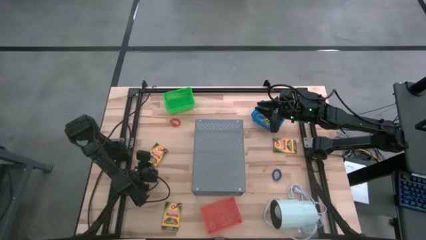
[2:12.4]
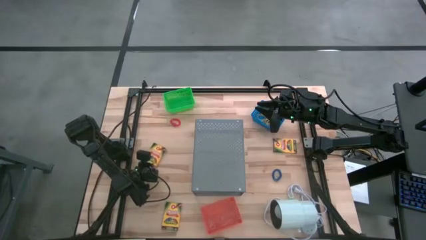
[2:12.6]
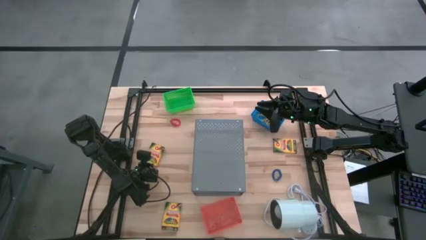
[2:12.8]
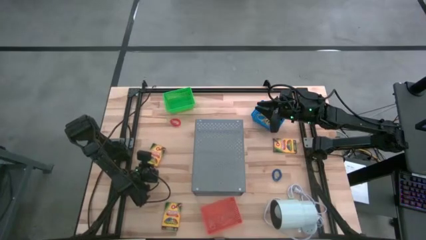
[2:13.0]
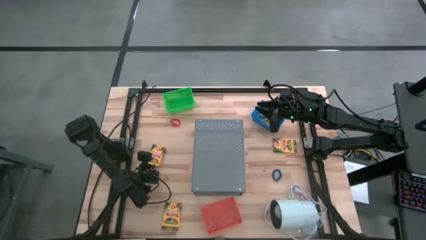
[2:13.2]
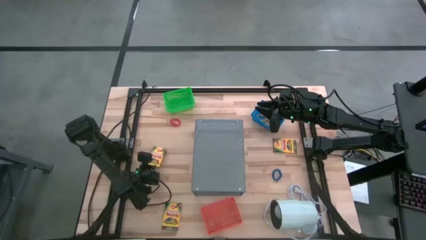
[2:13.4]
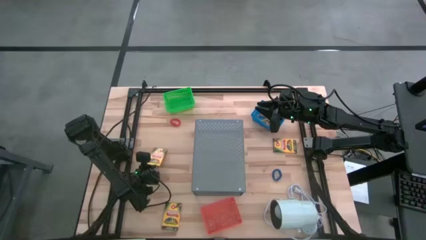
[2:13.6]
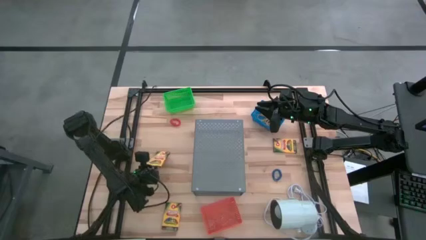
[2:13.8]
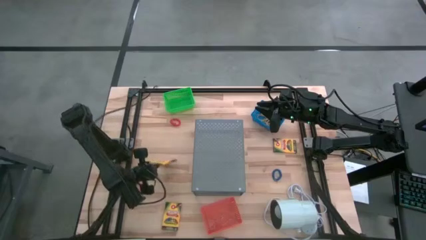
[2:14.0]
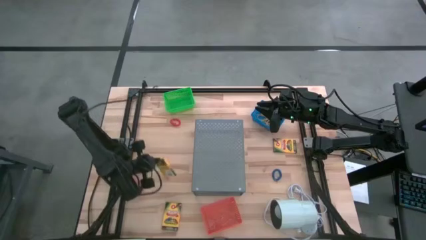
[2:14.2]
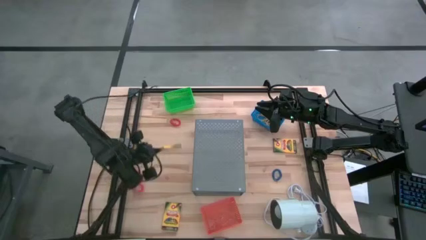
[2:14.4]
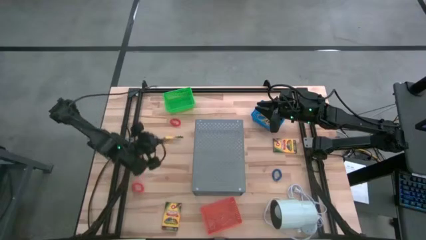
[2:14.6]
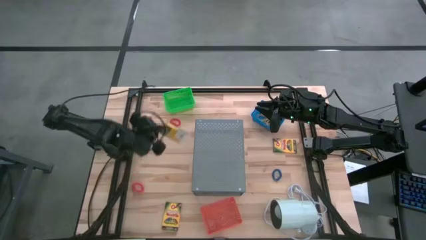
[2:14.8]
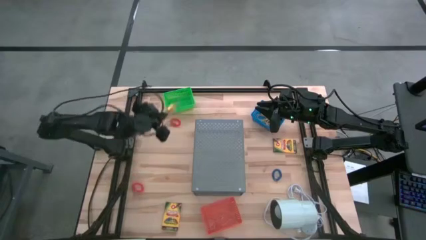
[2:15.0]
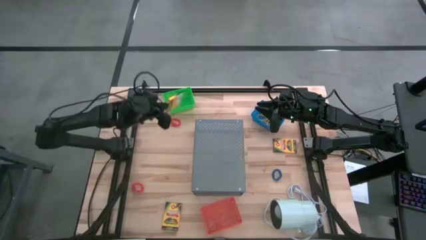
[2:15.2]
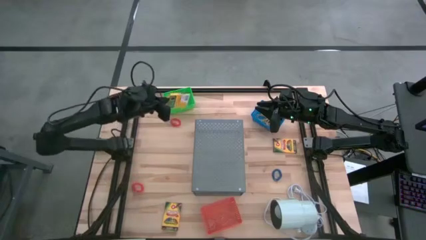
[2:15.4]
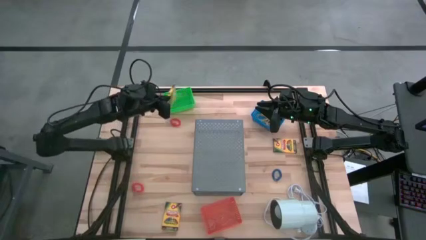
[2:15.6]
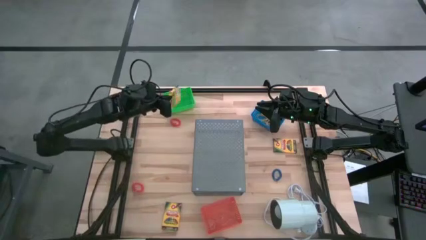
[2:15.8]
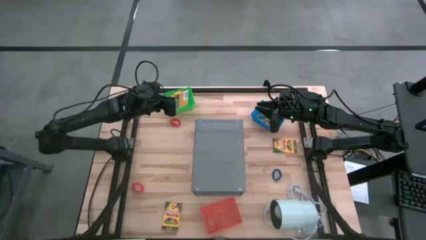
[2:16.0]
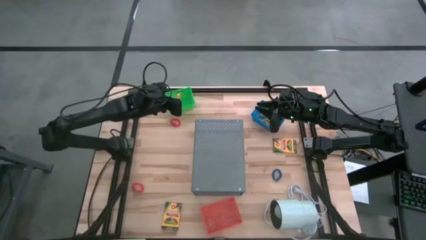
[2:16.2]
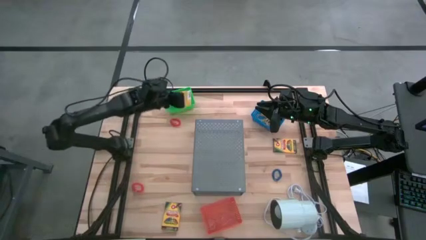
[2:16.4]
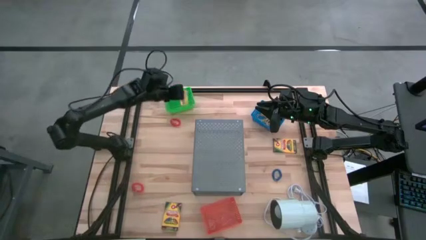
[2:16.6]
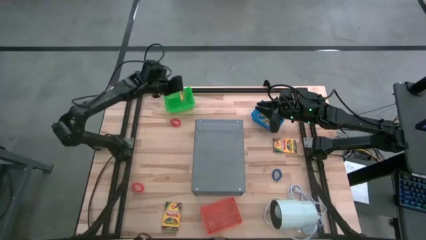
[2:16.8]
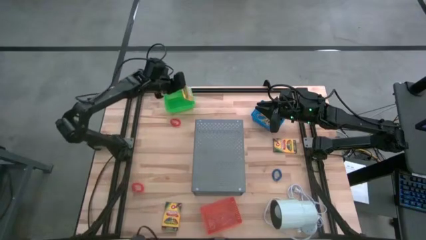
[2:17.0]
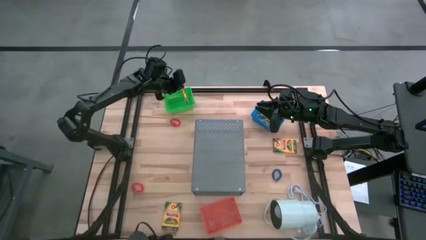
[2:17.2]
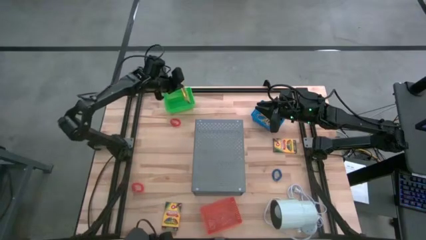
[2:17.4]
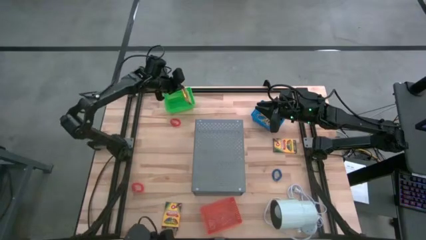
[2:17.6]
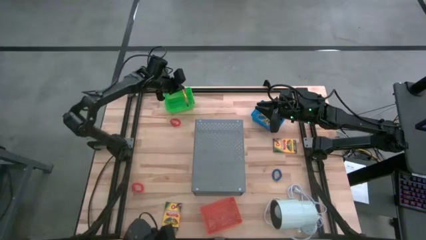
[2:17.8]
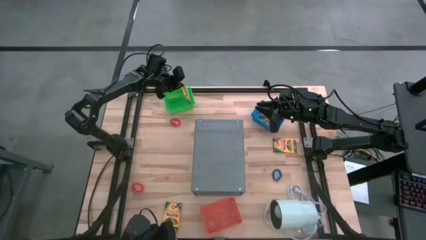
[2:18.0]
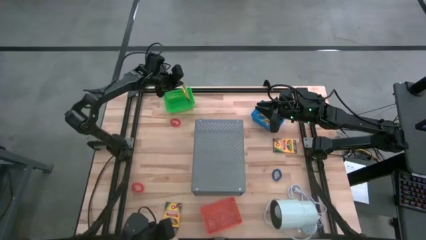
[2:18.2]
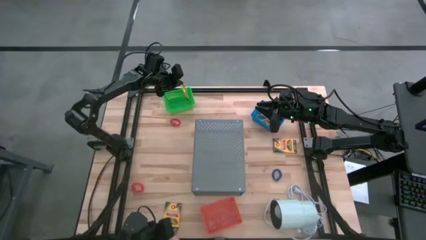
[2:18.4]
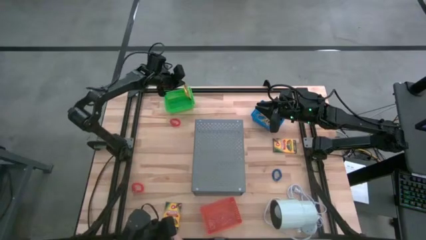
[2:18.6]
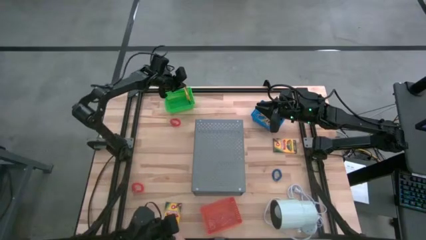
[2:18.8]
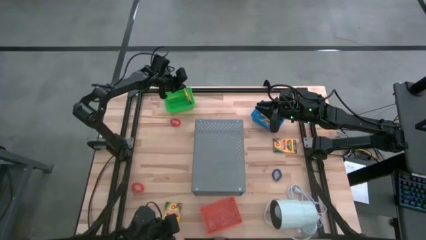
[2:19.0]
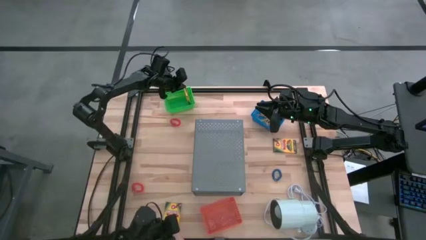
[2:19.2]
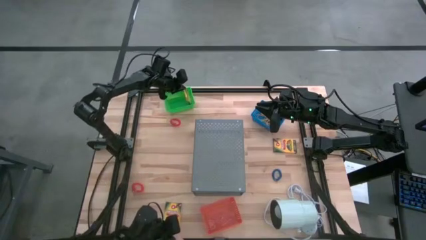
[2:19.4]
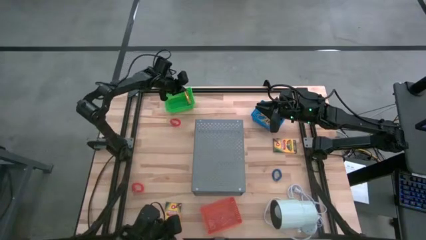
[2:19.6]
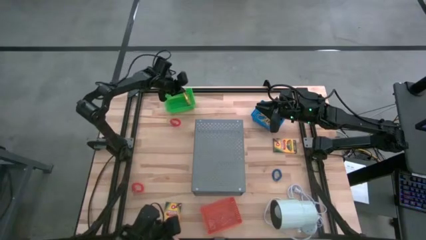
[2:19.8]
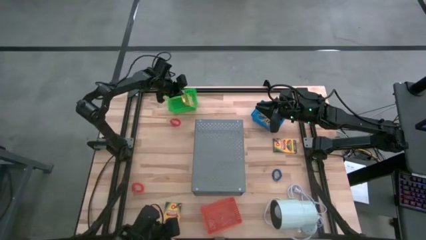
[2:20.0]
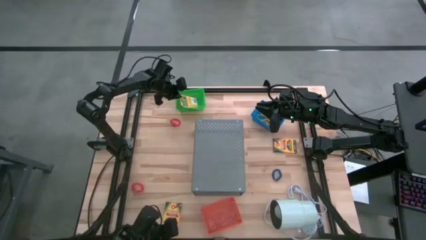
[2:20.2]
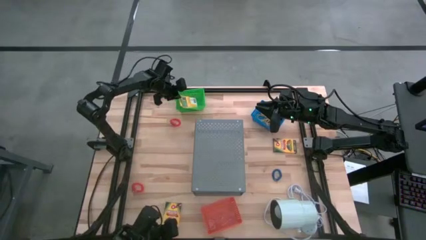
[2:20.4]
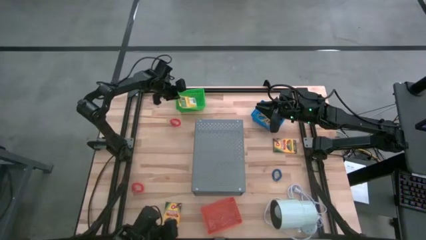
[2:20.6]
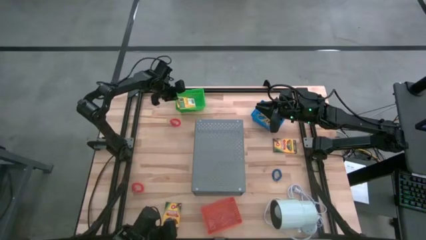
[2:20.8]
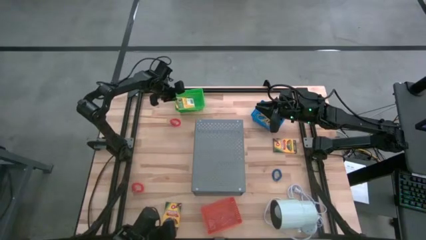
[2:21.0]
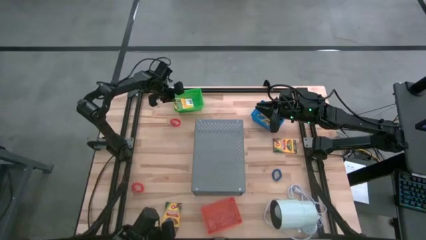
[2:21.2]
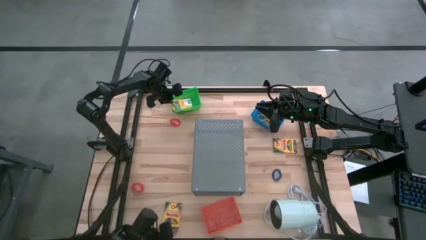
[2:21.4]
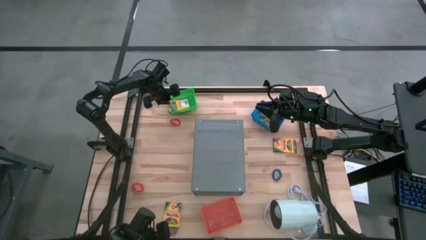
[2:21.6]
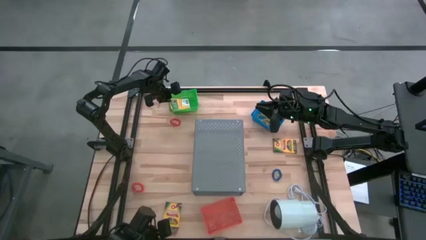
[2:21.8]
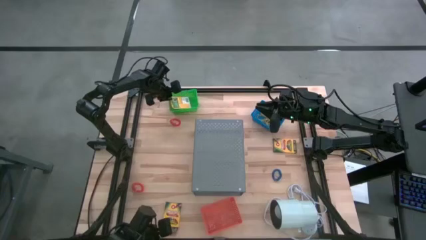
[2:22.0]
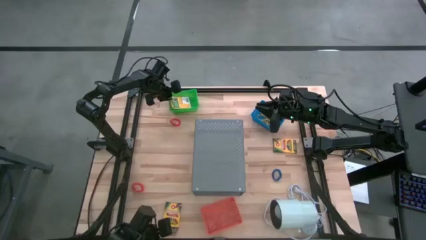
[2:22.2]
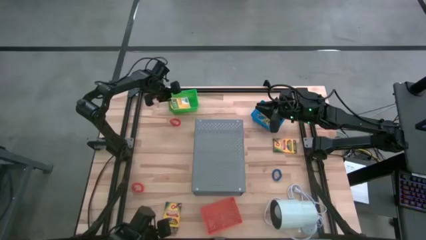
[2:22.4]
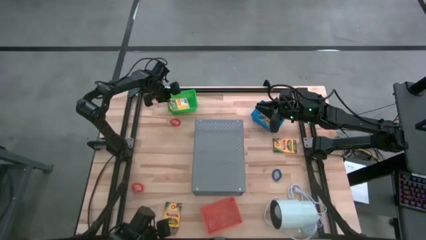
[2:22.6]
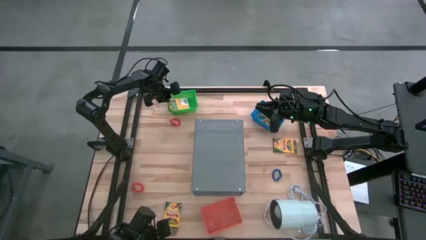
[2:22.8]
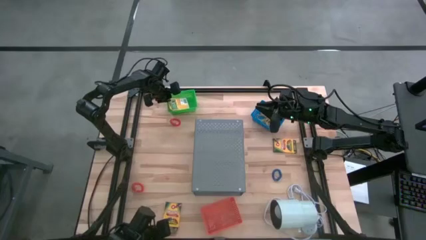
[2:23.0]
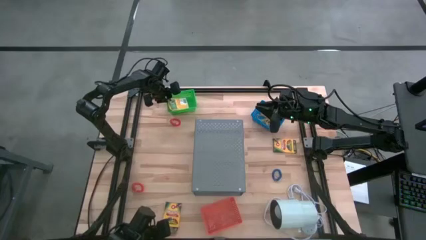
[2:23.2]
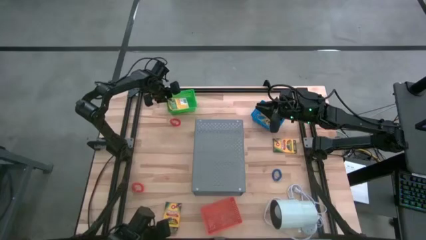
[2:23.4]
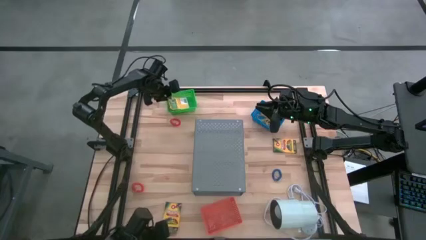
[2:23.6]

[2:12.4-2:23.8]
Task: Pick & Place Office Desk Supplies
Put the top left yellow crayon box into the green basket

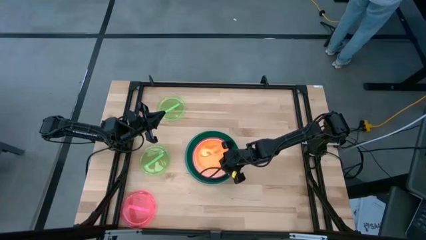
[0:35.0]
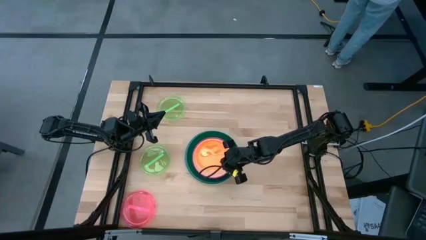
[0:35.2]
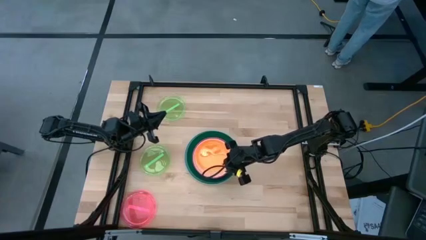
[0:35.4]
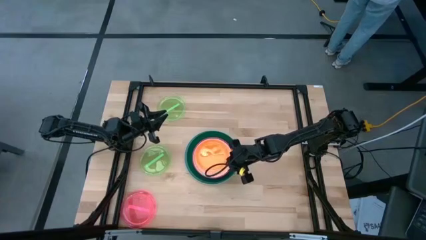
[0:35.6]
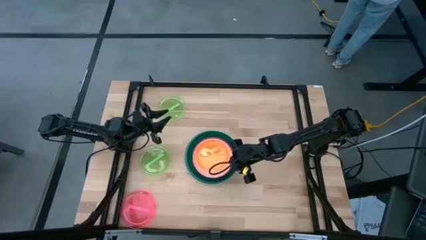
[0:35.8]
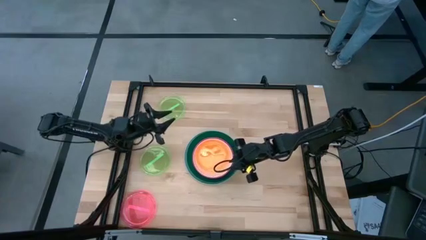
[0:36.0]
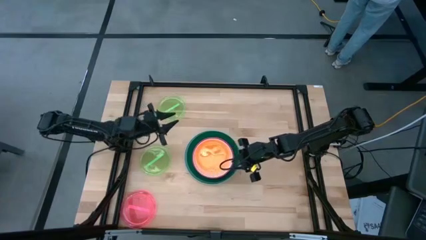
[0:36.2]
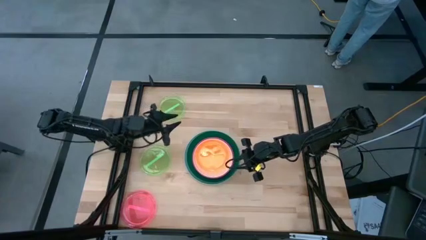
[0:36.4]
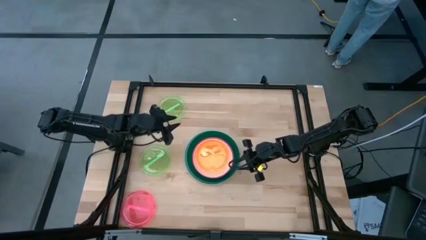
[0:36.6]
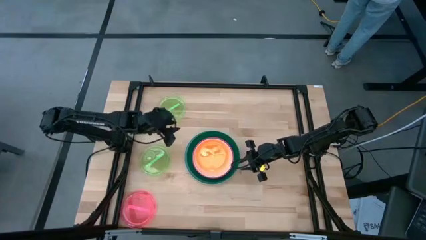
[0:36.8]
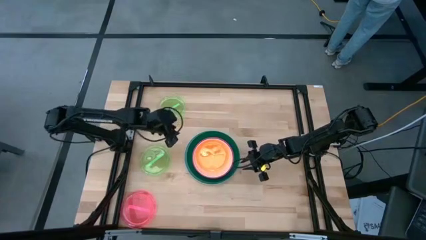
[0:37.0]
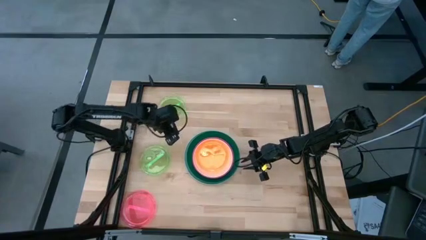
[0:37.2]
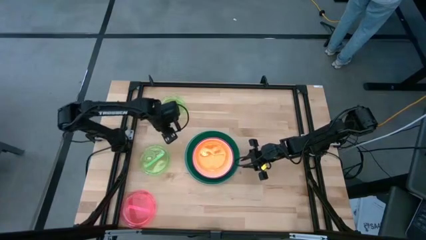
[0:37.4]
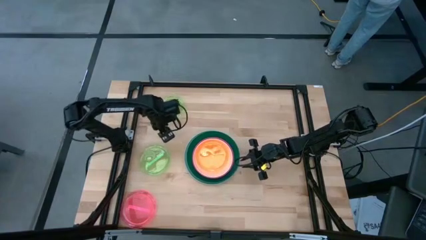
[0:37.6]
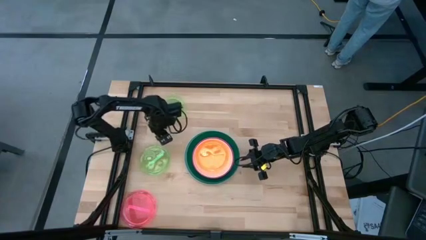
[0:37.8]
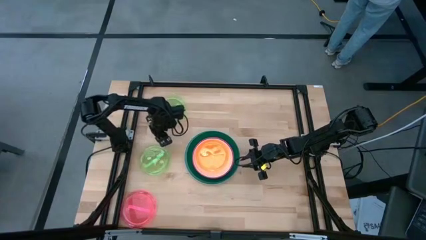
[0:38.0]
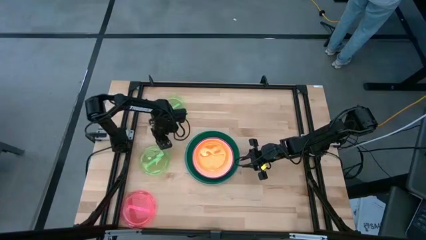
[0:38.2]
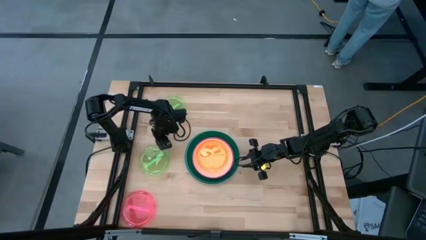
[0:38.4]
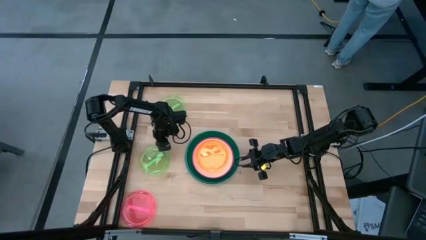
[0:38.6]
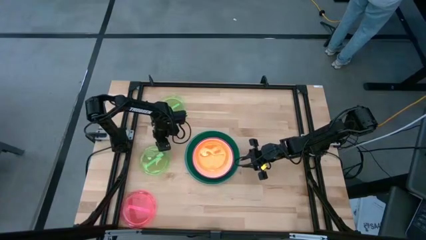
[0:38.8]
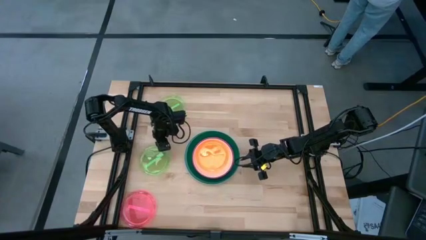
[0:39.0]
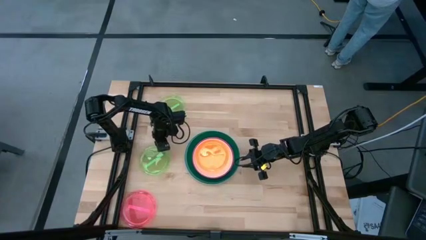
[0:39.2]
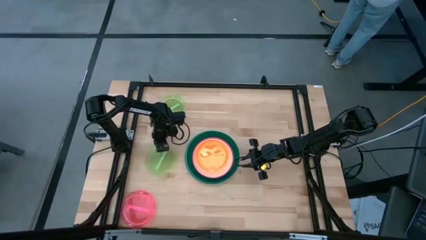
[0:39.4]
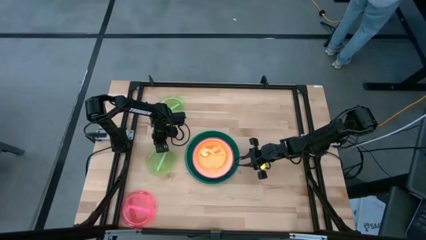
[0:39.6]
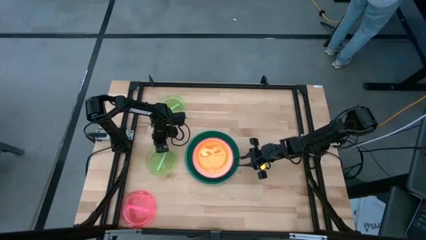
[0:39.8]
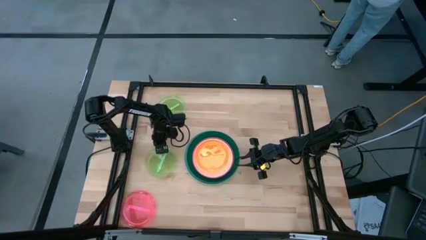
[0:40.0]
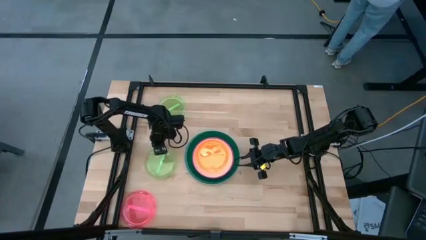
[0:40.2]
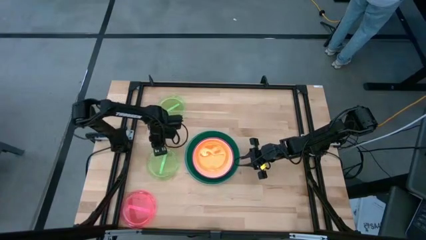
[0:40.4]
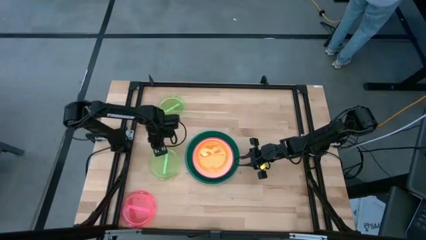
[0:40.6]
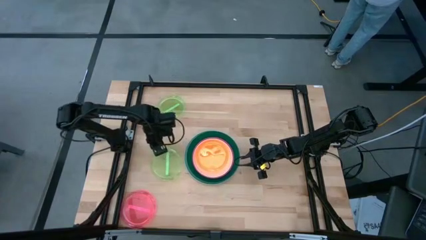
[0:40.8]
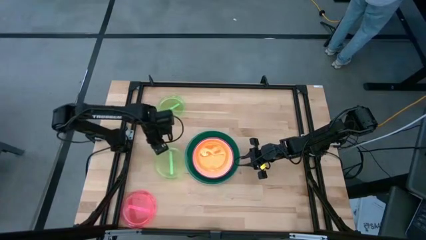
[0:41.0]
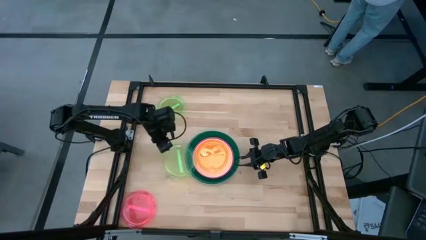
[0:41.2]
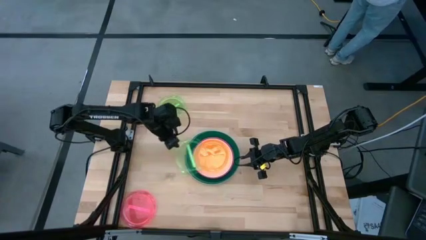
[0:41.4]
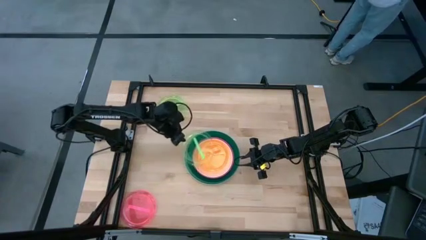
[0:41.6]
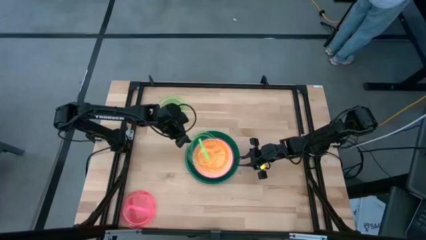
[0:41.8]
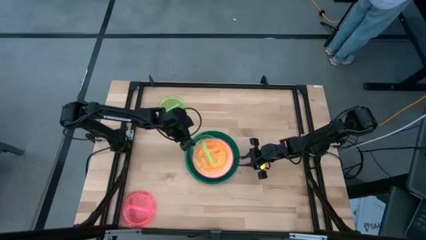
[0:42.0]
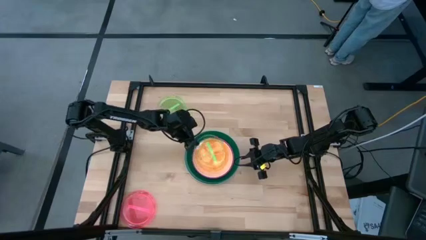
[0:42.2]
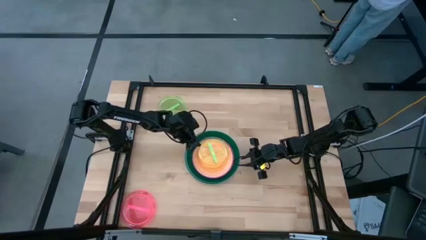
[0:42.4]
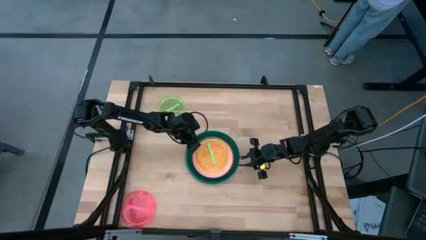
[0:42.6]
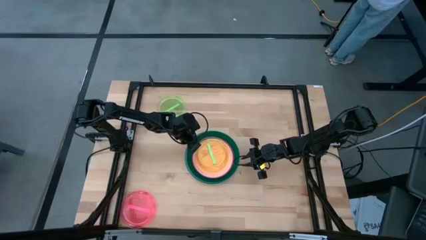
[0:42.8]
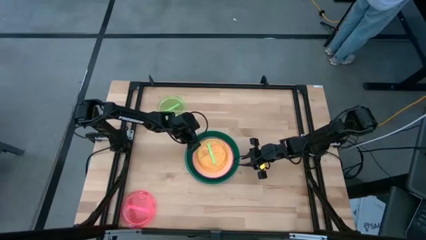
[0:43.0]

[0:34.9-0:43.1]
Task: Stack plastic plates
Stack the bottom light green plate on top of the orange plate
